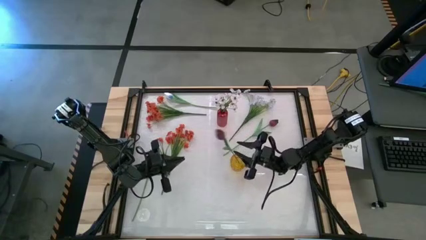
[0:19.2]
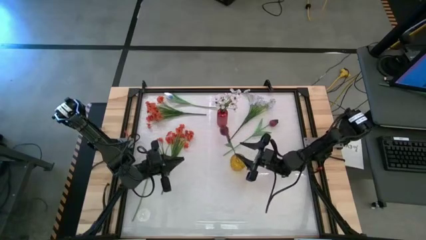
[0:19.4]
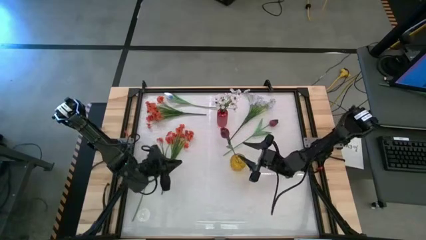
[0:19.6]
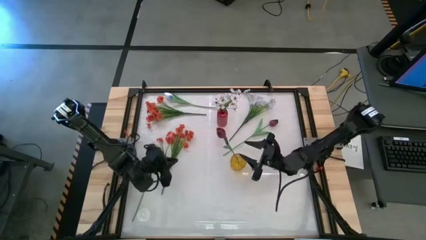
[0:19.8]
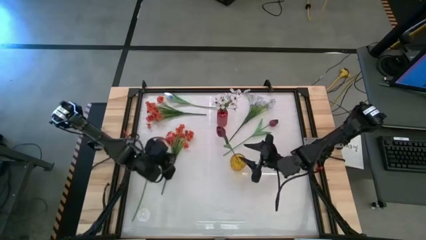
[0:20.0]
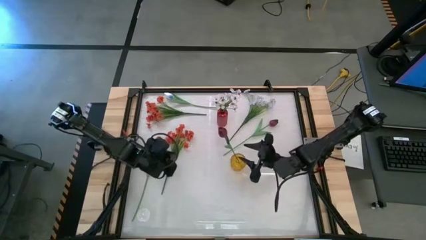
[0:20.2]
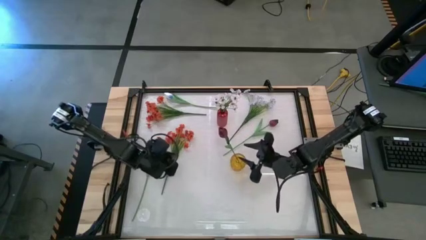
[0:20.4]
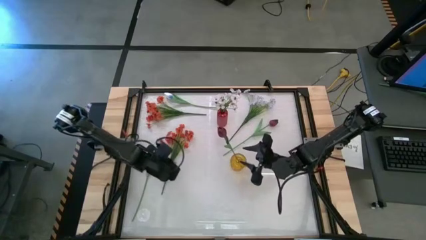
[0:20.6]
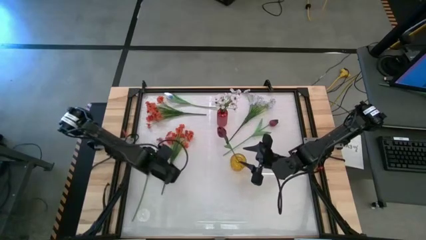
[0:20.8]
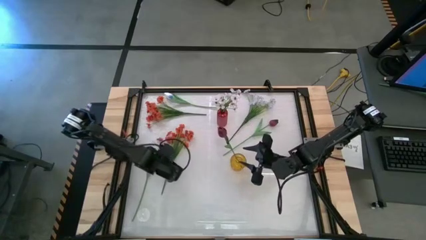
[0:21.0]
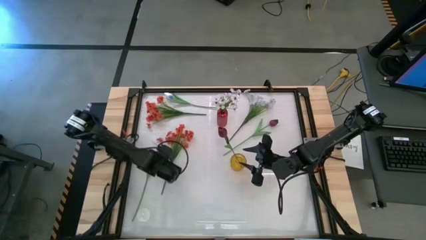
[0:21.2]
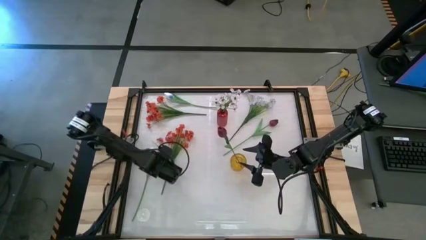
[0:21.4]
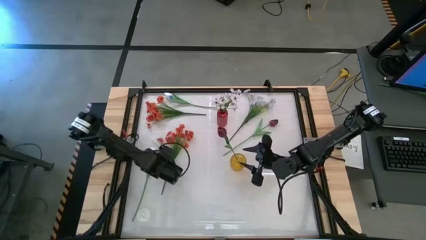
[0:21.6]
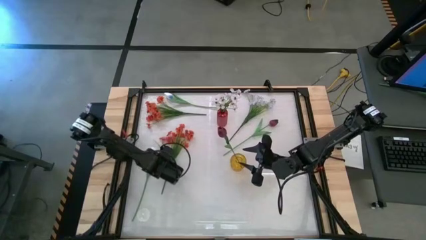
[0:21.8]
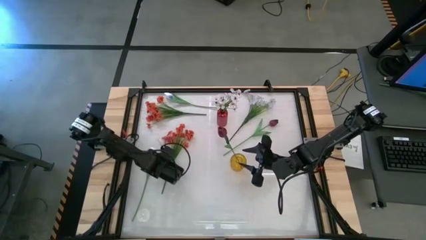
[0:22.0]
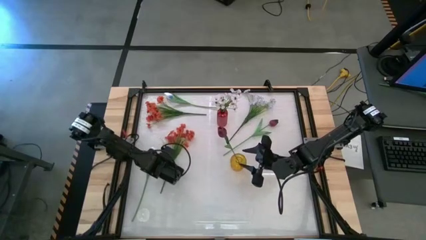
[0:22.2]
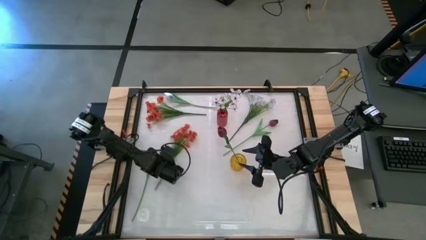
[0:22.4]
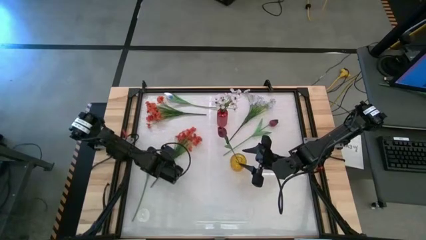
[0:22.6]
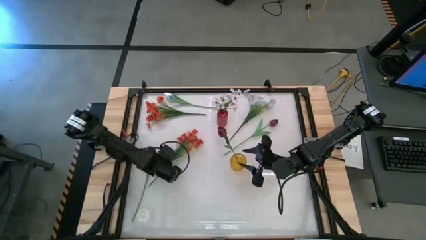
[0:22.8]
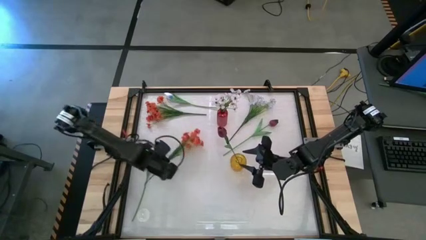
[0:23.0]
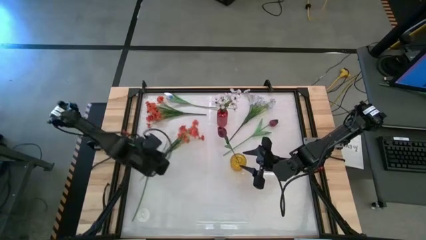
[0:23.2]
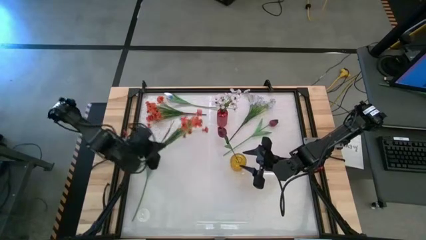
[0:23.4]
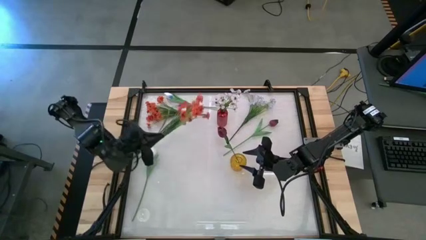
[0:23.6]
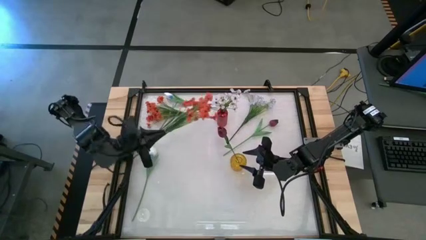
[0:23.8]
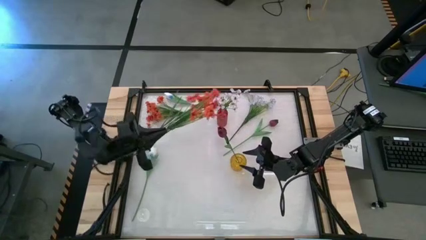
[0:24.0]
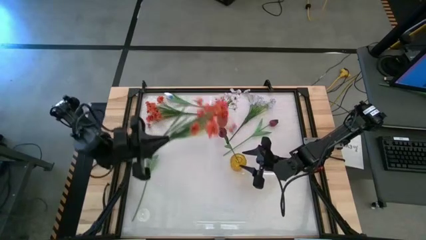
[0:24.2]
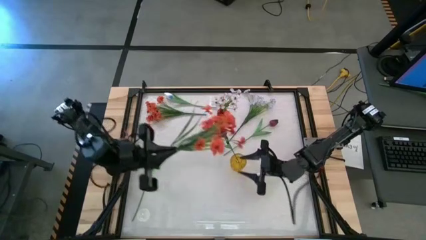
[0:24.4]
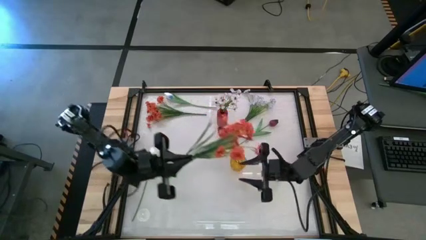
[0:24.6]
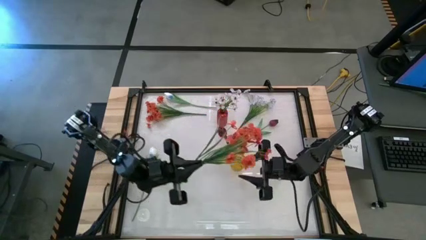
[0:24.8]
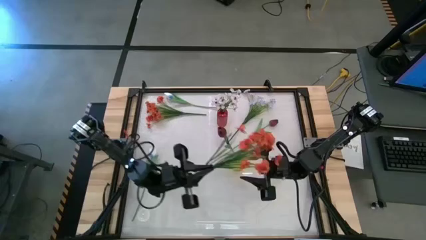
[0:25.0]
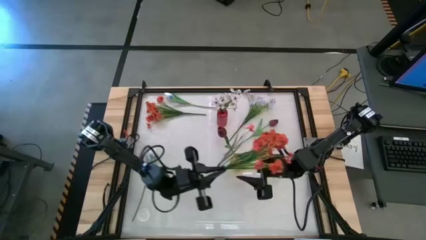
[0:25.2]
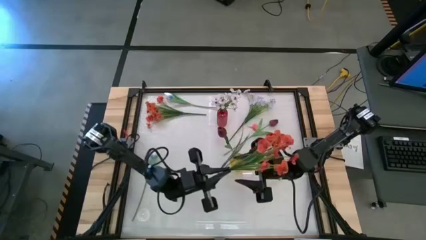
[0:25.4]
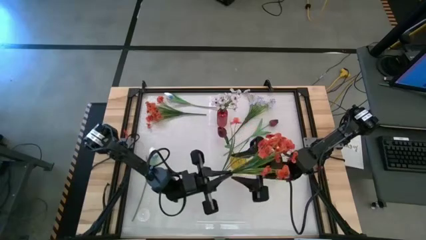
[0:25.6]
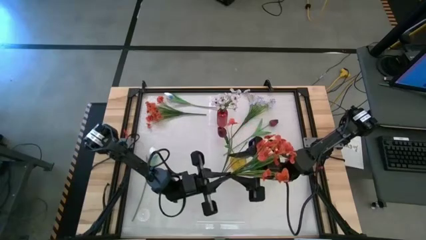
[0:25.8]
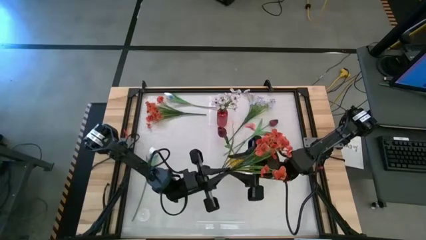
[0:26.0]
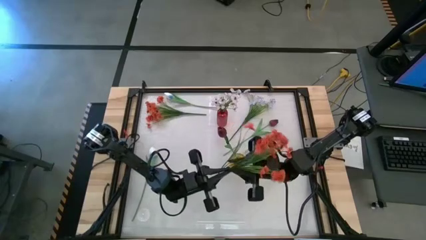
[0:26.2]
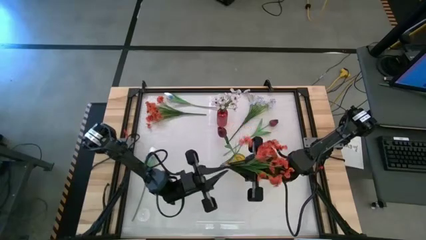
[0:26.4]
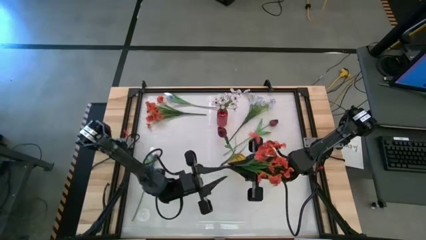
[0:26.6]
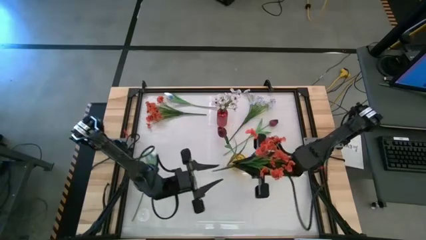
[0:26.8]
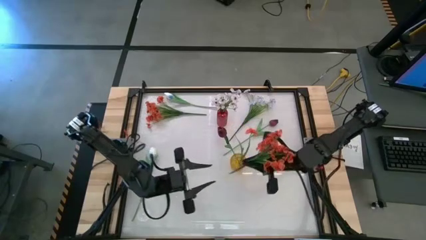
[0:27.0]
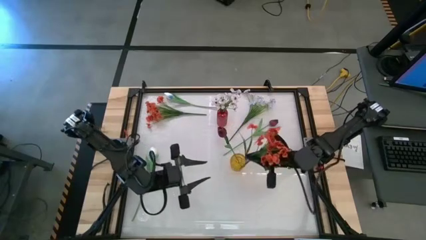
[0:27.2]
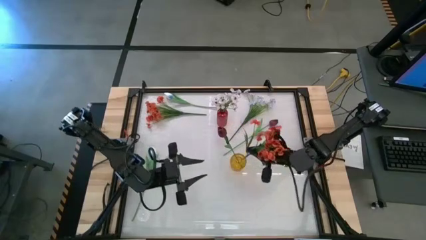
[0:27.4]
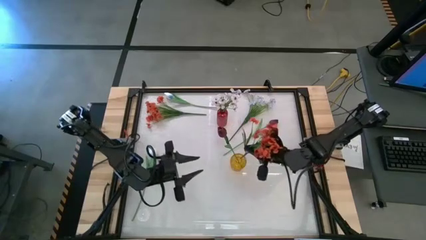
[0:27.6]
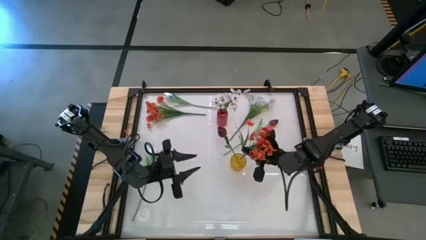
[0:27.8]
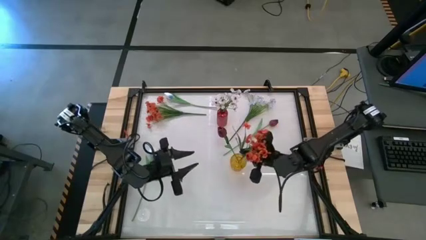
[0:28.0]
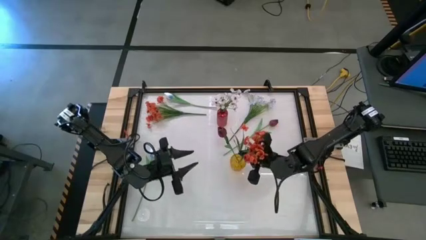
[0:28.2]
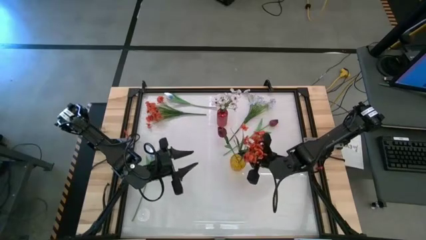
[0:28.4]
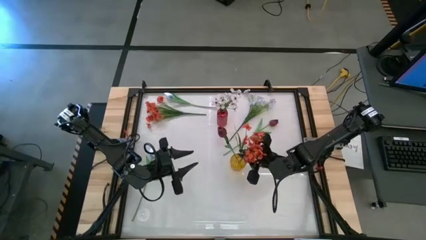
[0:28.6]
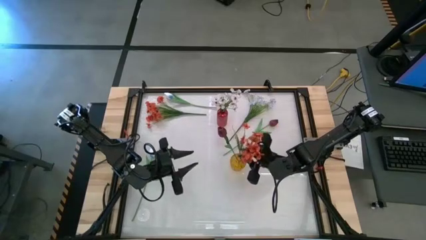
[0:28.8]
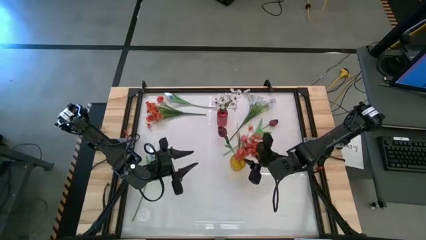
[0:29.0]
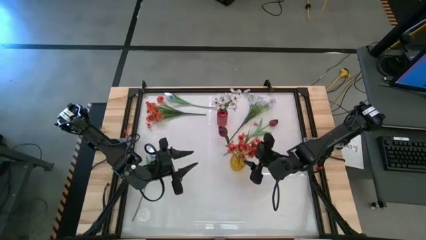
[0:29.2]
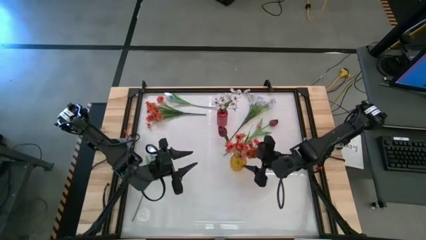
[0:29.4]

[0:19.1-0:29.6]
Task: Sort flowers into vase by color
Put the bottom orange flower into the yellow vase

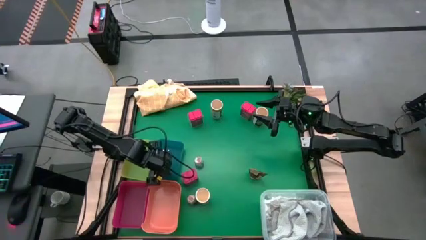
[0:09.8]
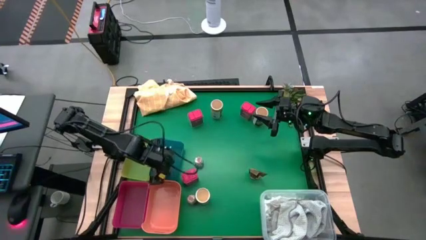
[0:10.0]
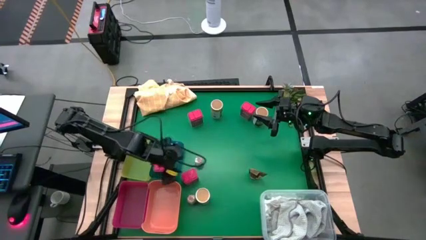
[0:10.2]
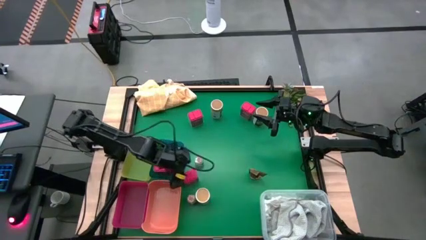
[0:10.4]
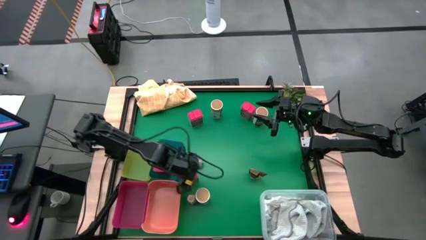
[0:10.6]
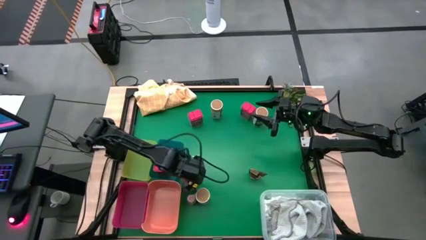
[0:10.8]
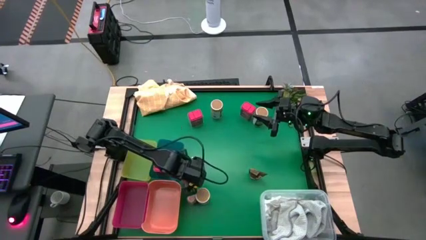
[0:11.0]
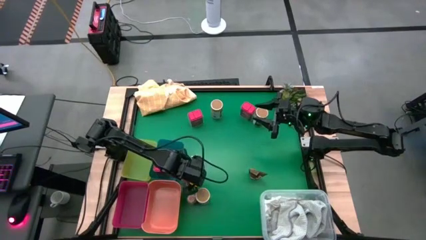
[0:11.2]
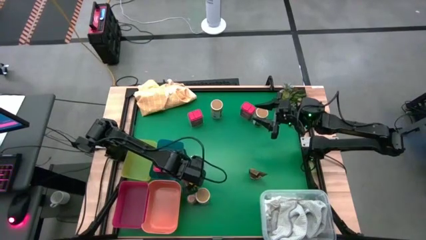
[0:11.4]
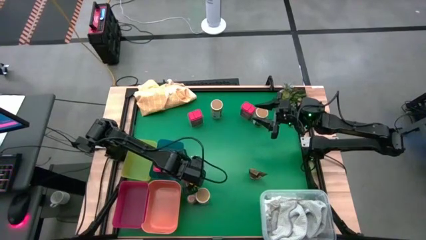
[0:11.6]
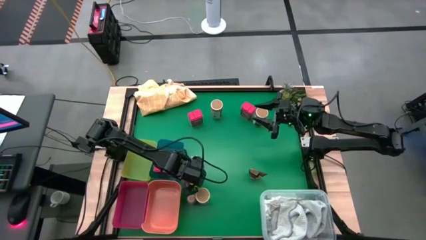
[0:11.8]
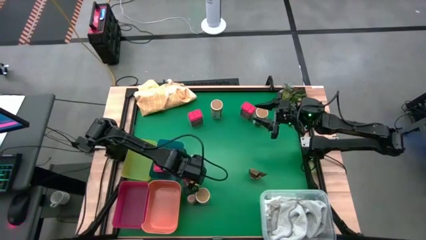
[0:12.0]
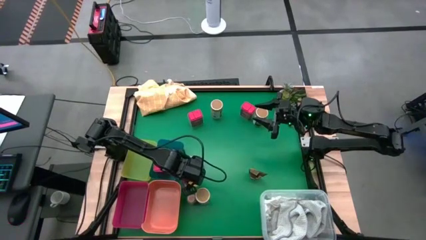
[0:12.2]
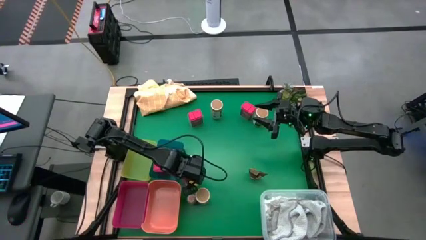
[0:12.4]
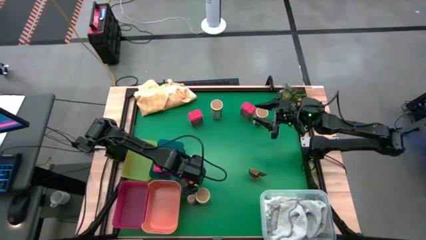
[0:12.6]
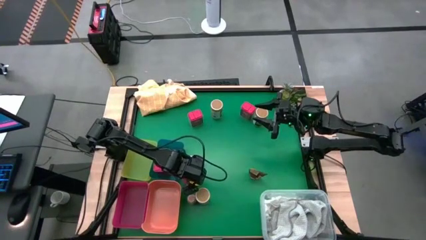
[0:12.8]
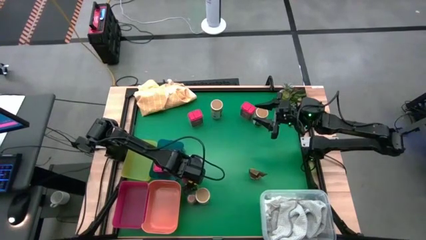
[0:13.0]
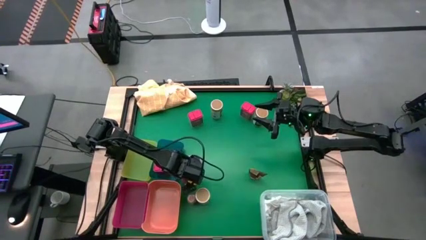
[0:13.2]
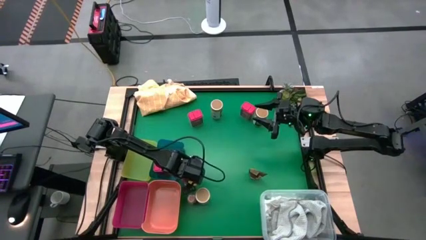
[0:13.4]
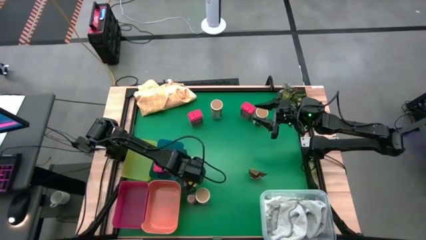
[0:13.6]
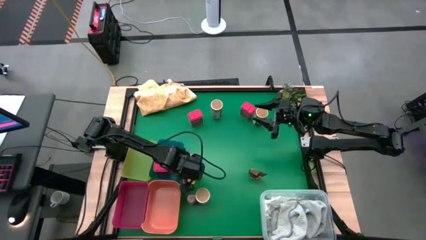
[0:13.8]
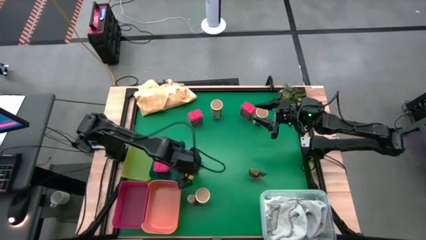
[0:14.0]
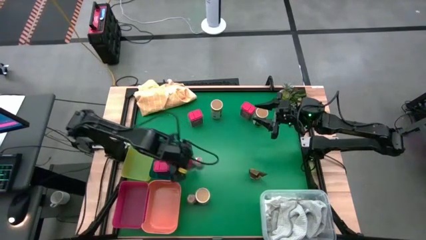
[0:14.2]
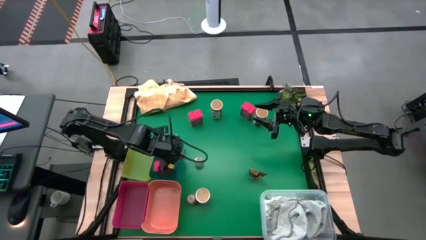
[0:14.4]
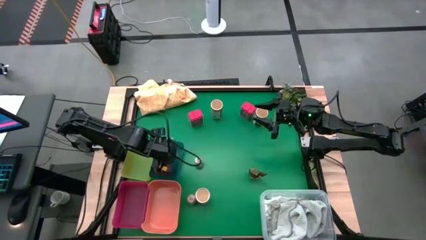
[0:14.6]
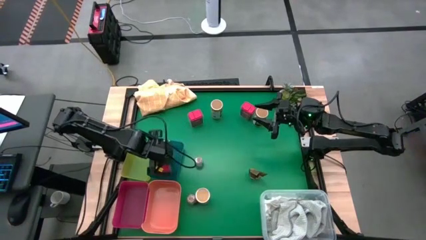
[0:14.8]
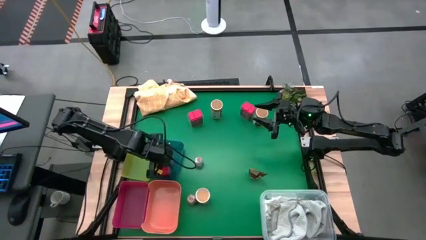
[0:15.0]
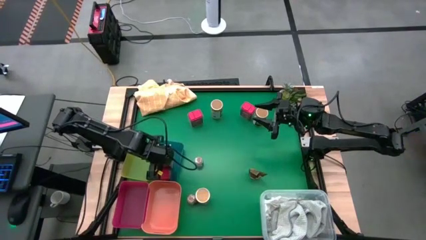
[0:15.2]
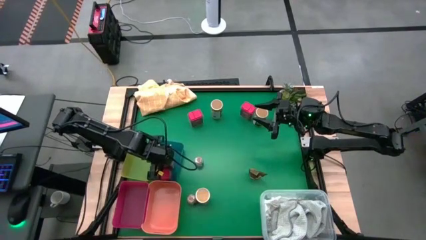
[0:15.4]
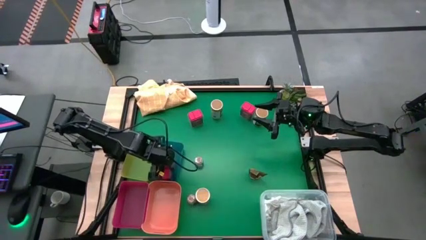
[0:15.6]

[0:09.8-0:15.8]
Task: Sort spices by type
Put the red seasoning can into the blue bin
